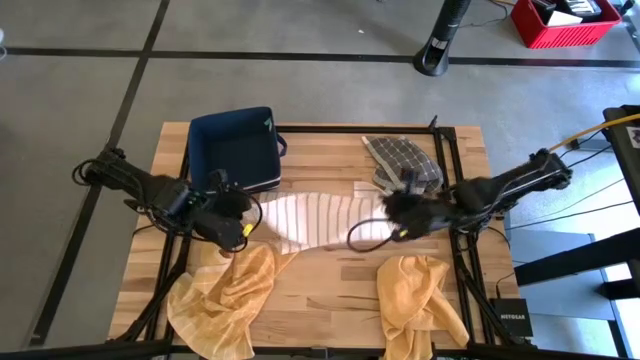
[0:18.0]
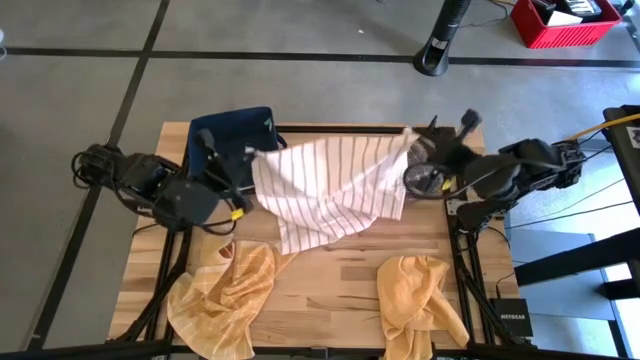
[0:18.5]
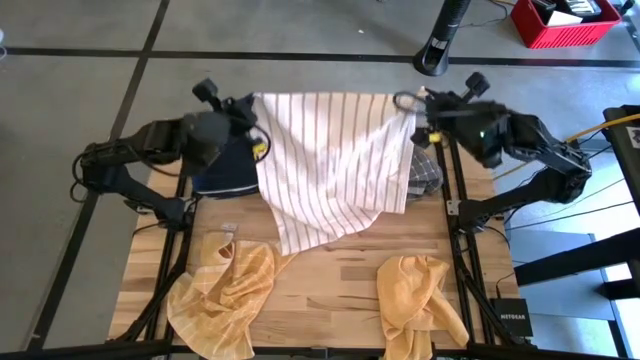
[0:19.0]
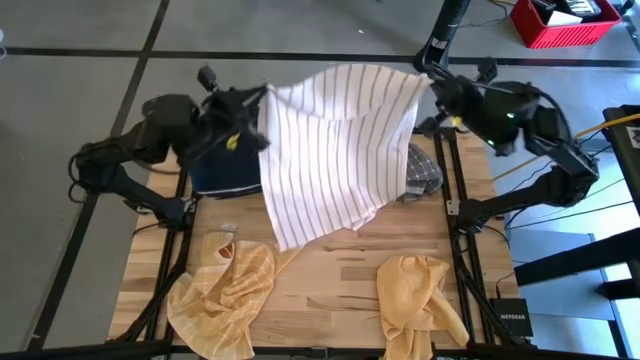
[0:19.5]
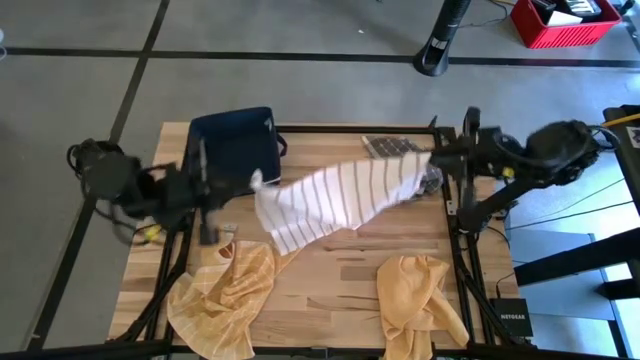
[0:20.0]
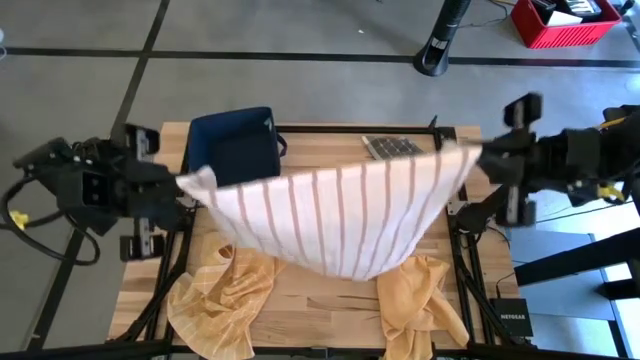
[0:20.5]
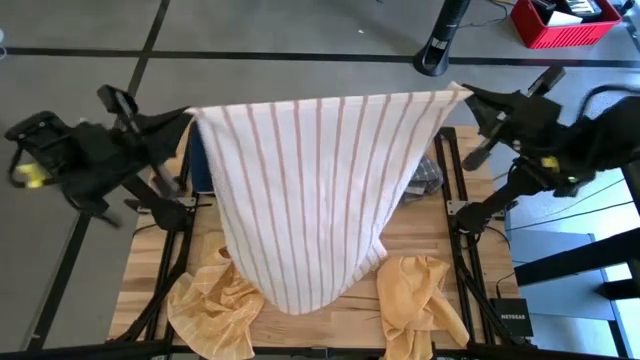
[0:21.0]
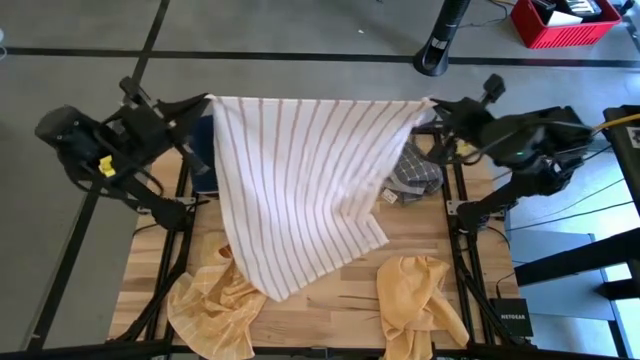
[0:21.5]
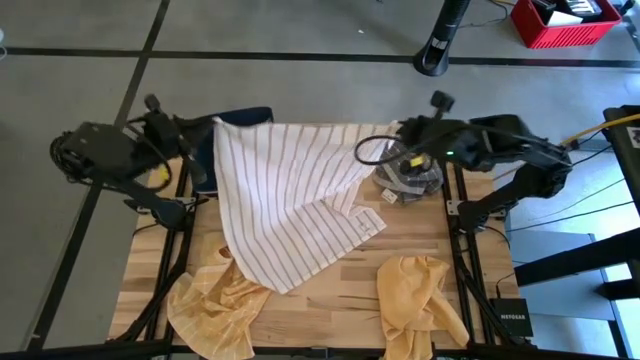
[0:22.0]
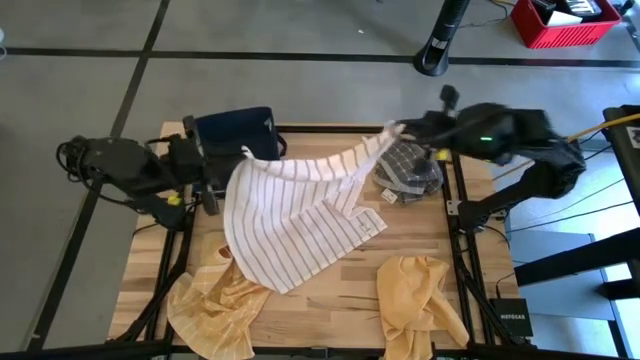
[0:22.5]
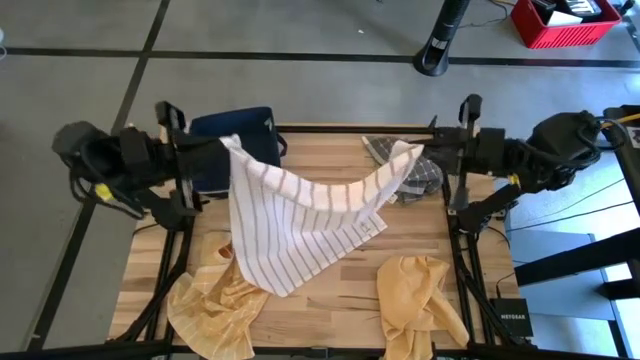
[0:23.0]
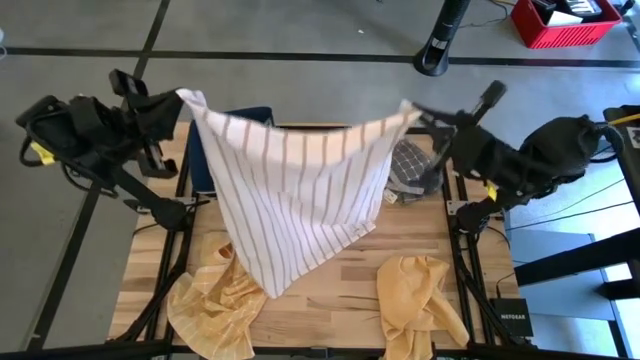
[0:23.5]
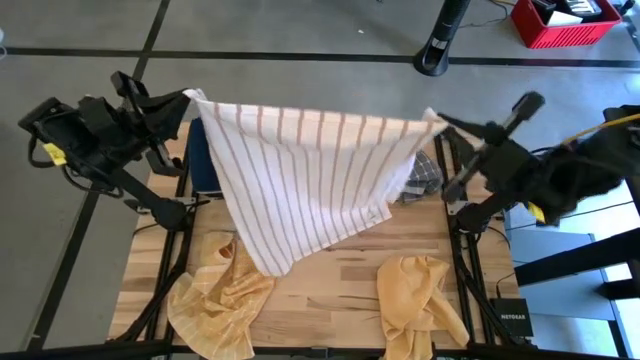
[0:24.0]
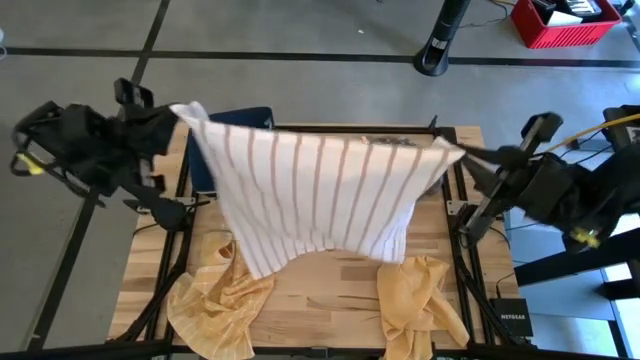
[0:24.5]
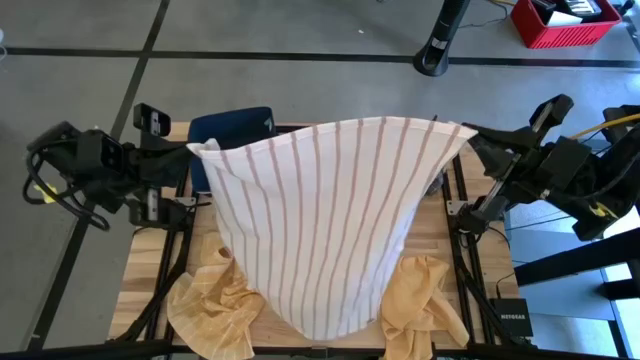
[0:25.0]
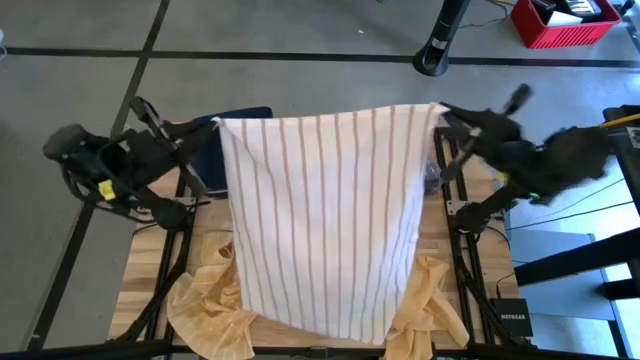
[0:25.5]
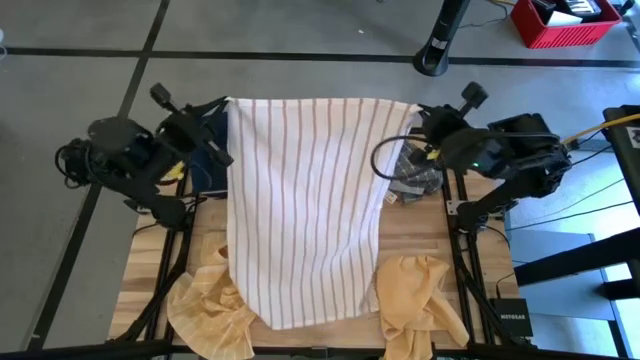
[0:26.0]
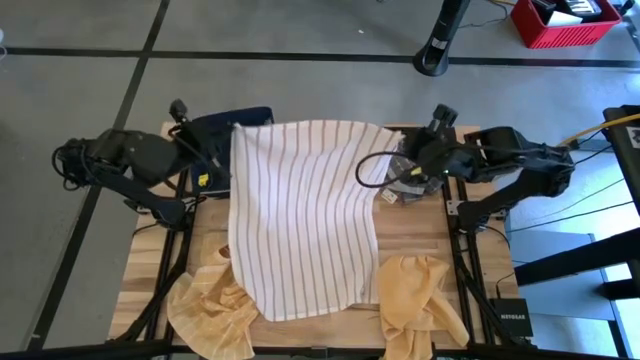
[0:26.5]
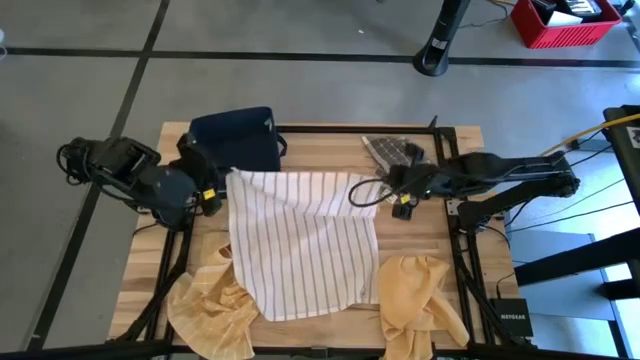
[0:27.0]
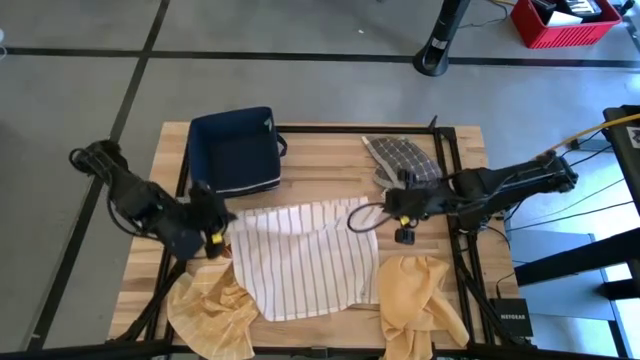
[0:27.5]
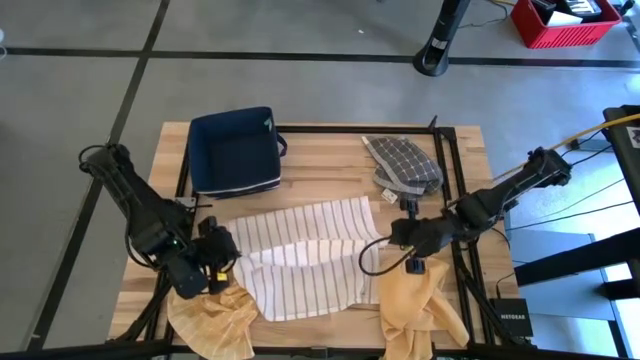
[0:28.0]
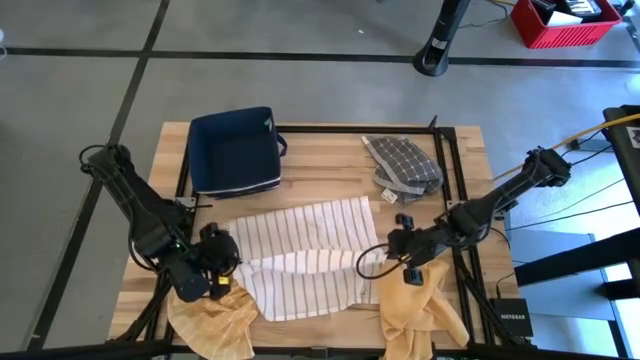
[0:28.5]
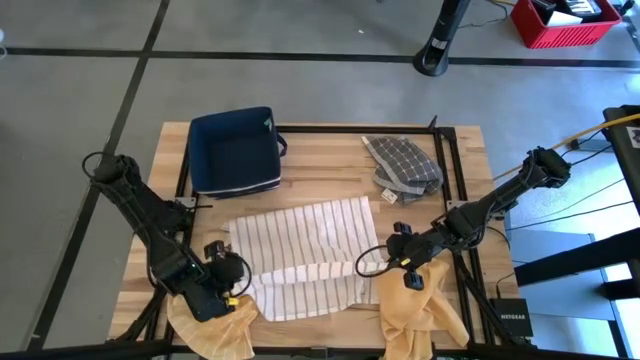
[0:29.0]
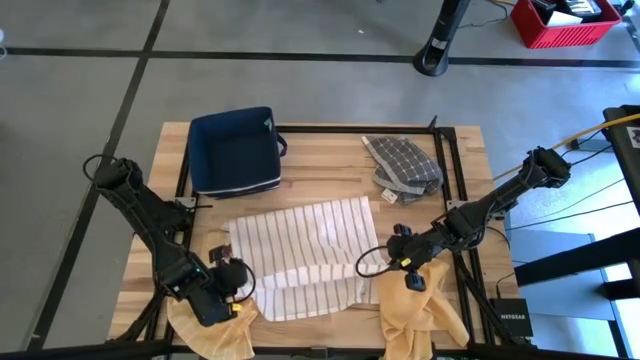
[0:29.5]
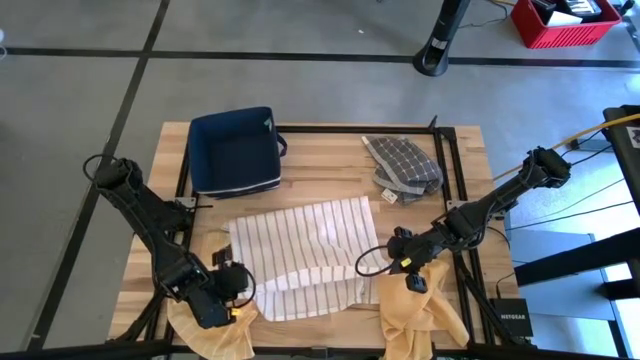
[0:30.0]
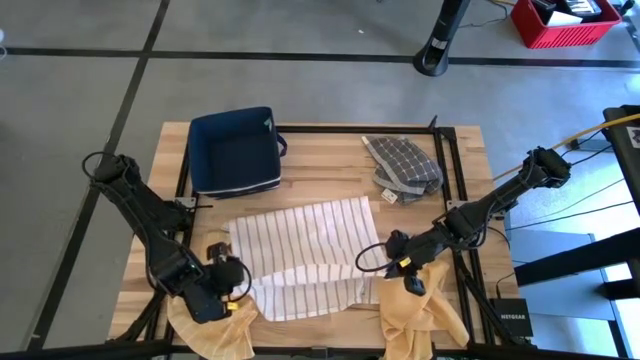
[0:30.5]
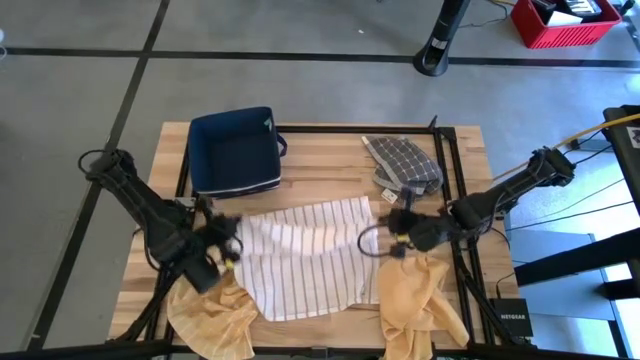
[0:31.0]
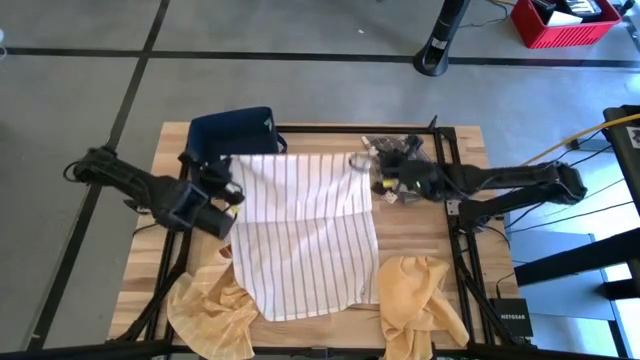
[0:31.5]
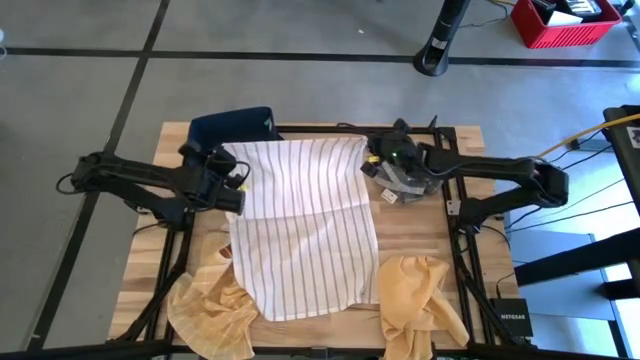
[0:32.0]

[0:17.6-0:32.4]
Task: Fold towel
Fold the white towel
